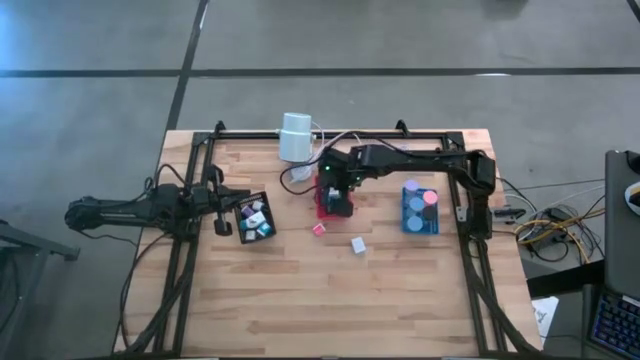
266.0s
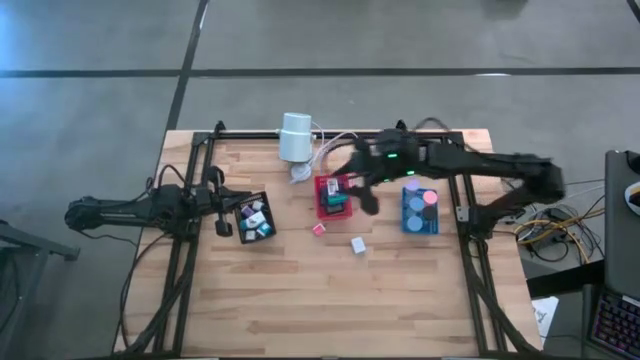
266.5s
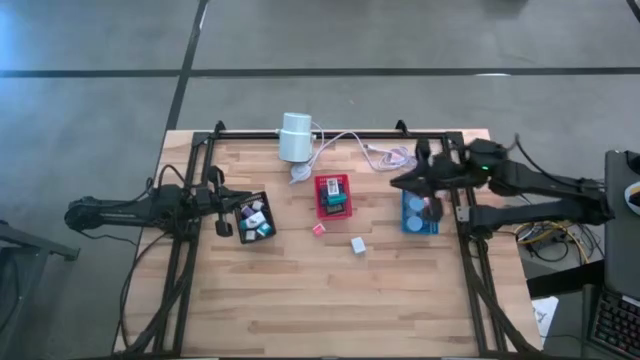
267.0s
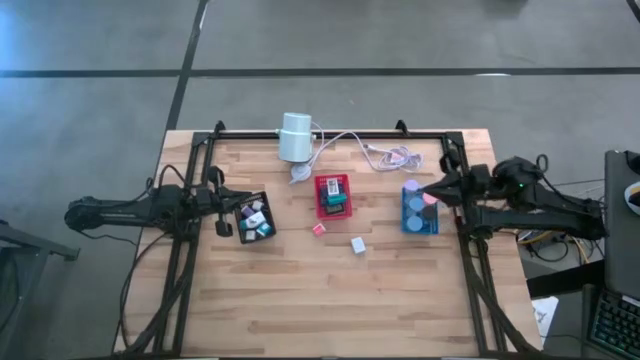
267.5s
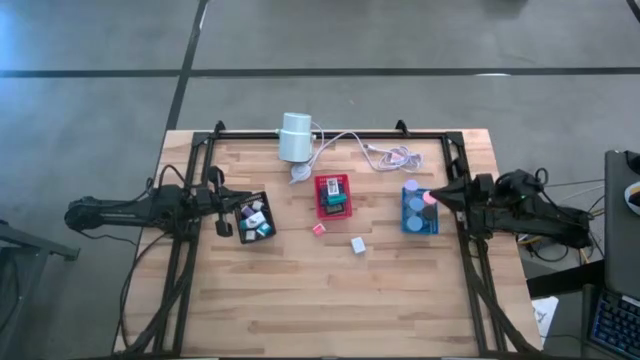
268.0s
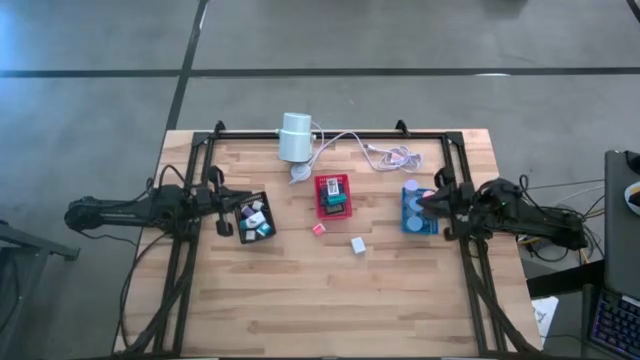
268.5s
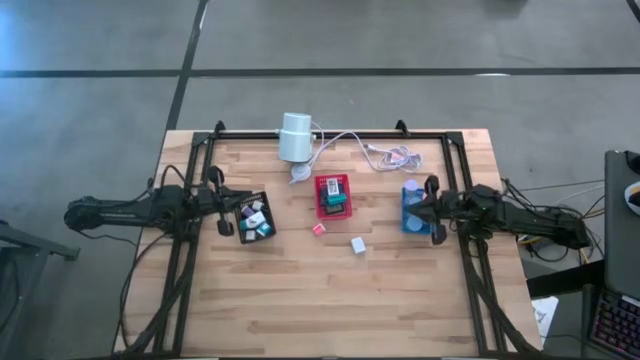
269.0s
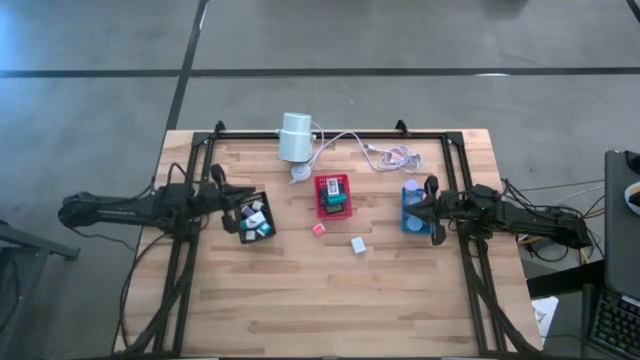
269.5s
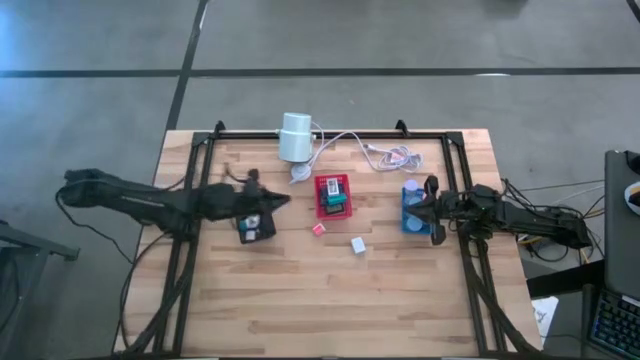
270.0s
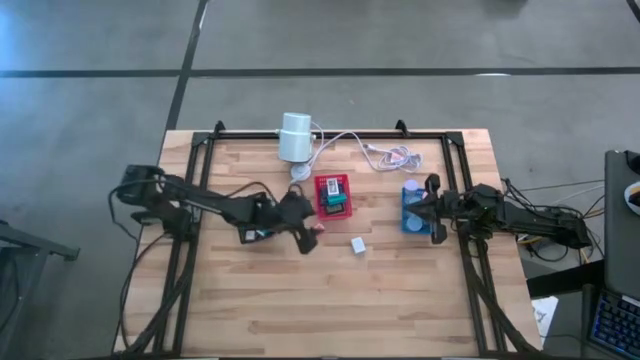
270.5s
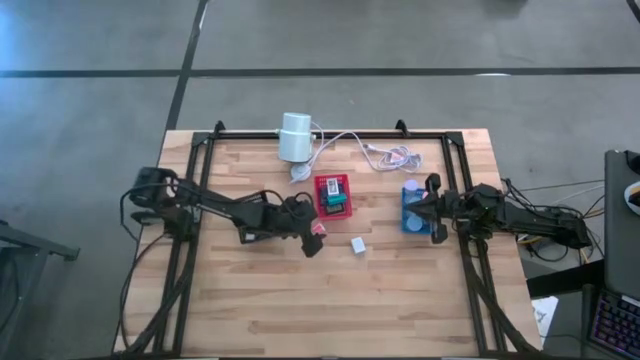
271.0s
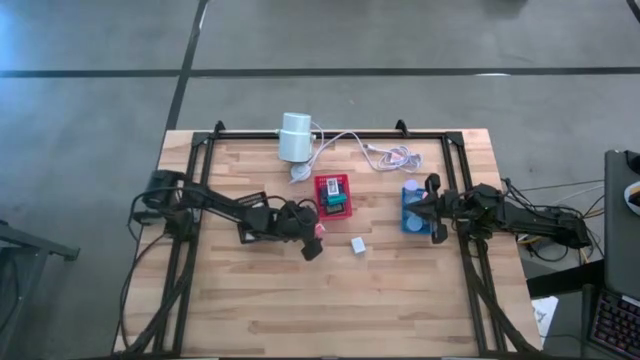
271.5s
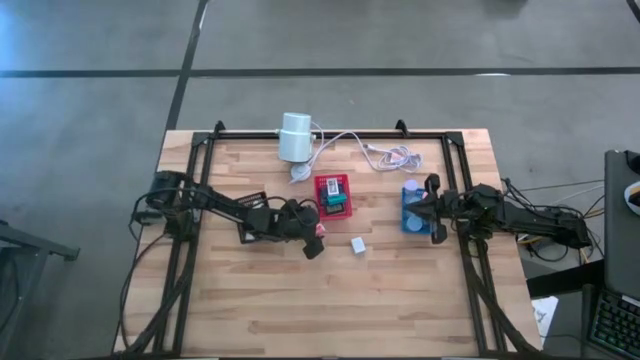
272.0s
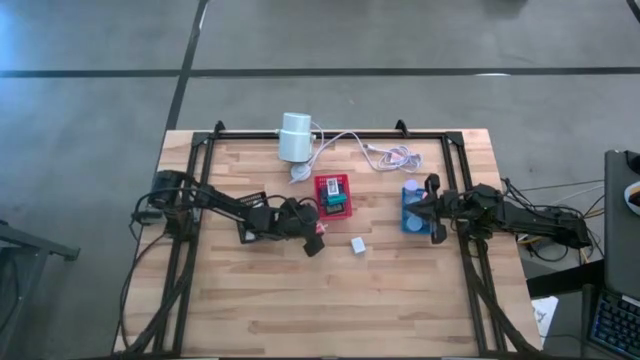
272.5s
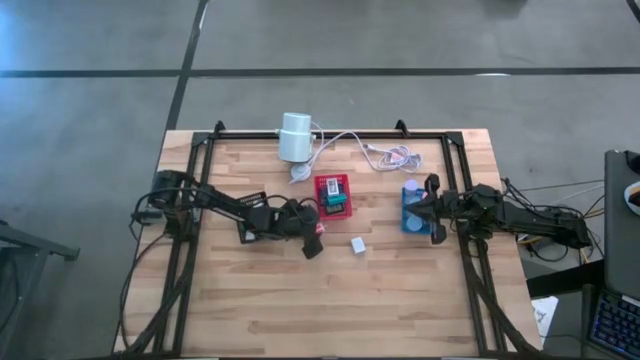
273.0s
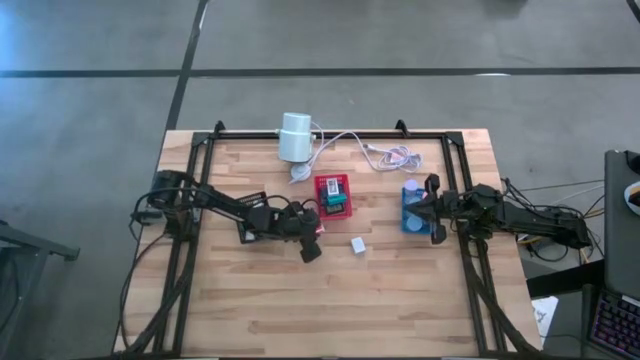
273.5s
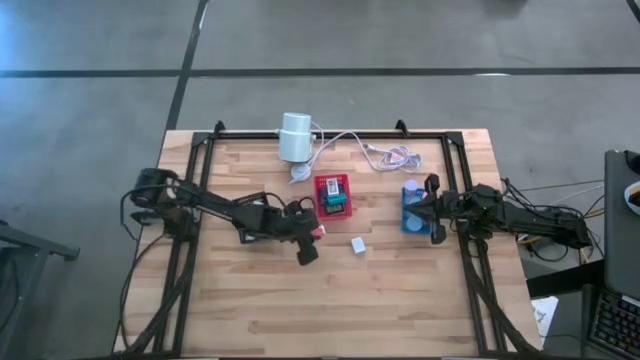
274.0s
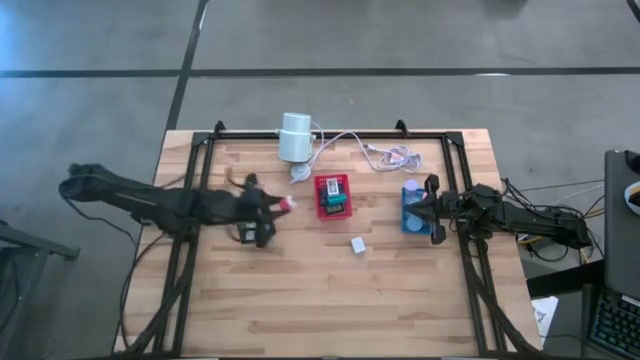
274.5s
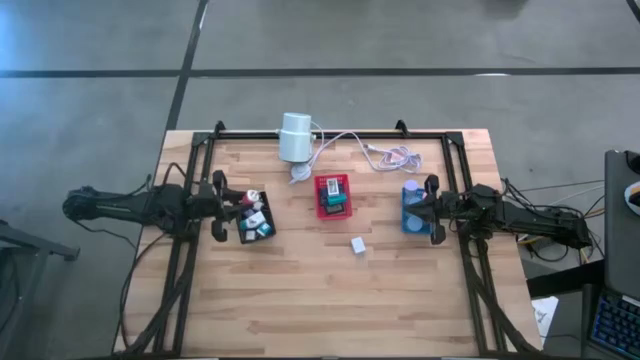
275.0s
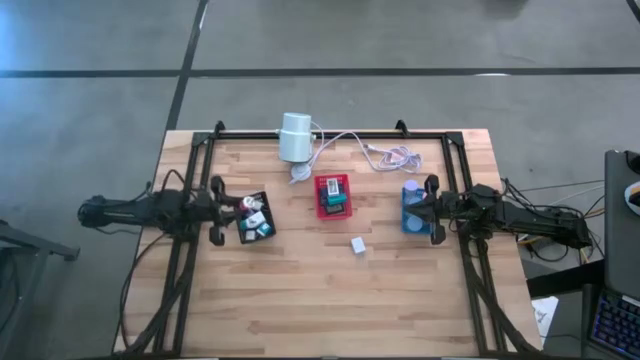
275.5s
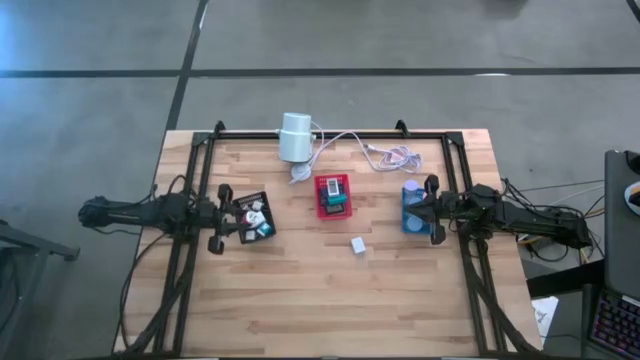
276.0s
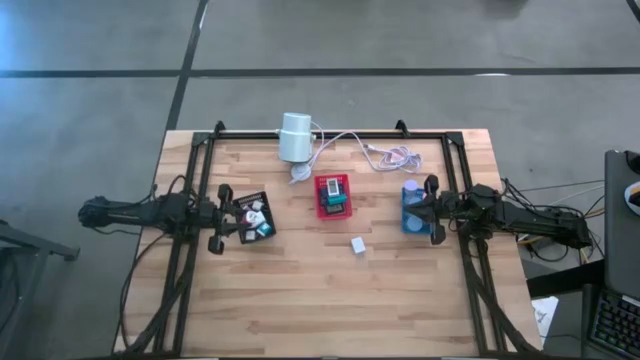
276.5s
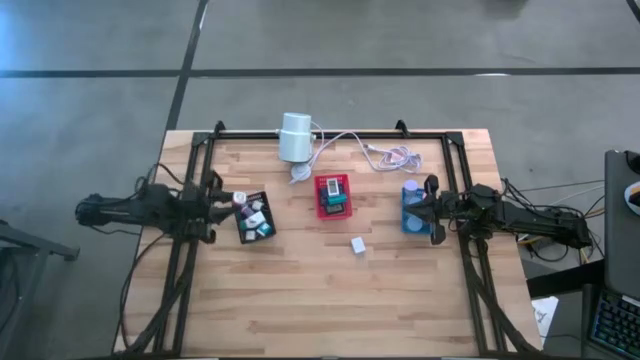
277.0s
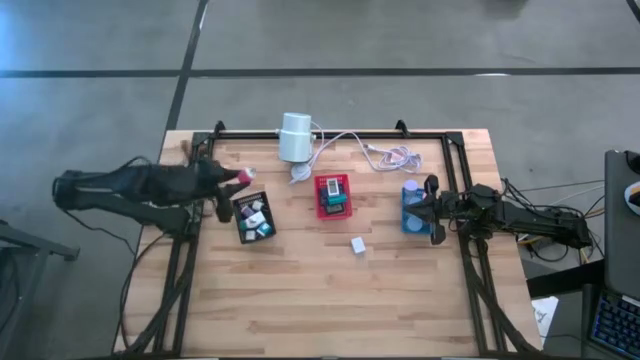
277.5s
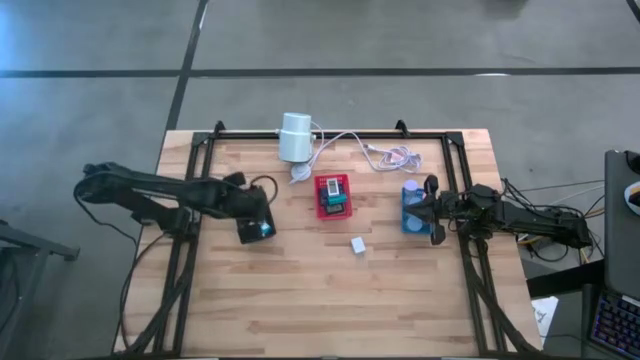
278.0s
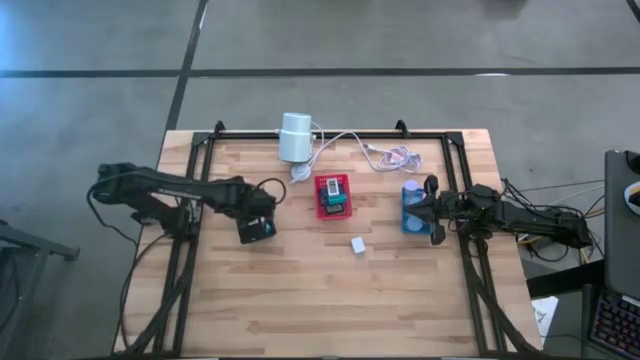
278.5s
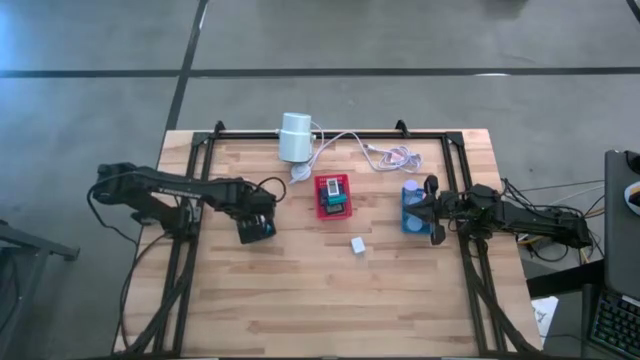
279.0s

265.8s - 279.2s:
Task: Pick & Place Office items
Put the pink charger adapter into the black basket

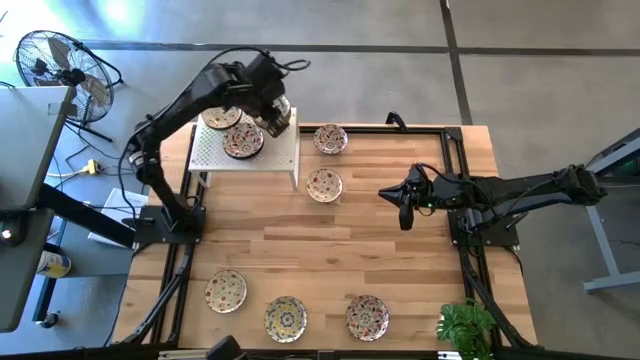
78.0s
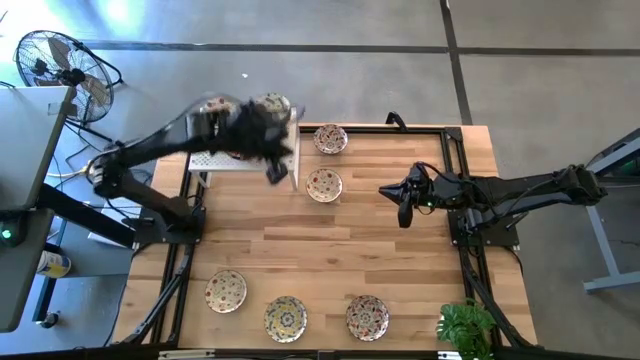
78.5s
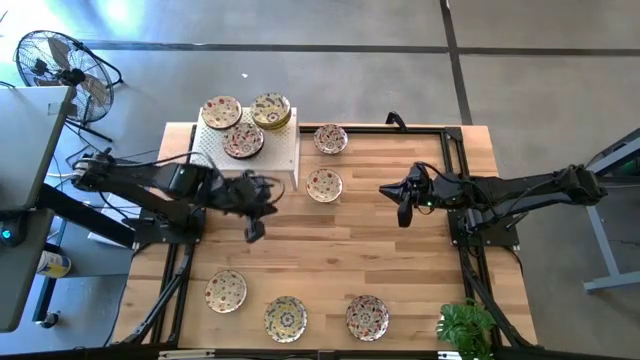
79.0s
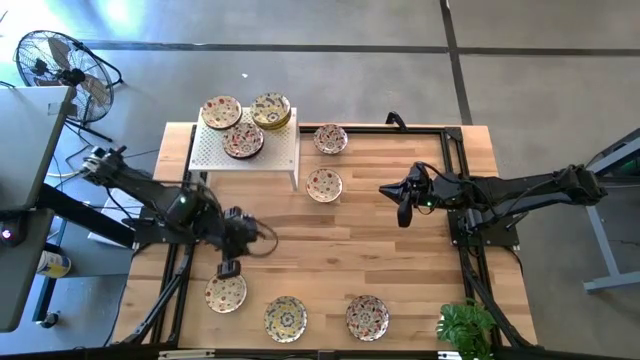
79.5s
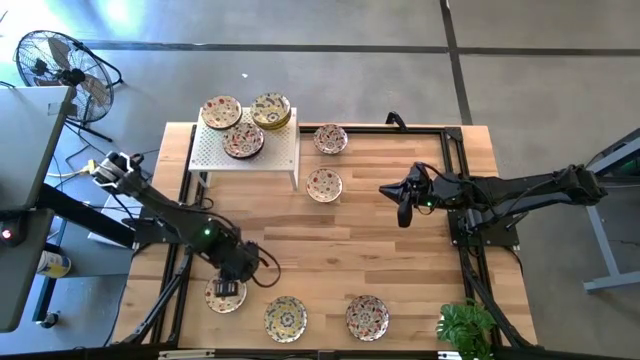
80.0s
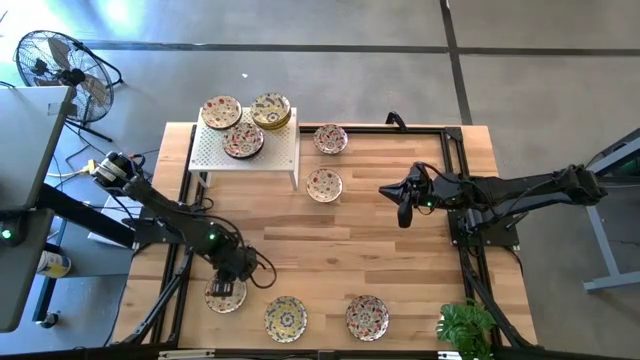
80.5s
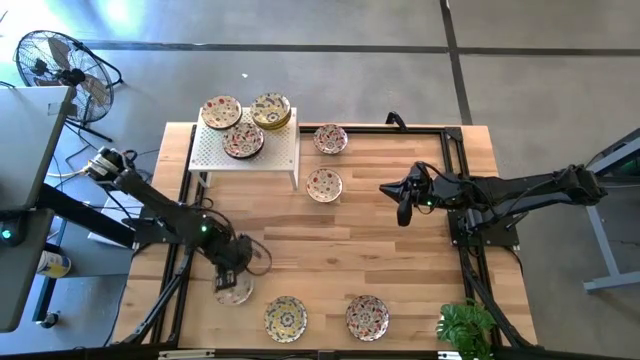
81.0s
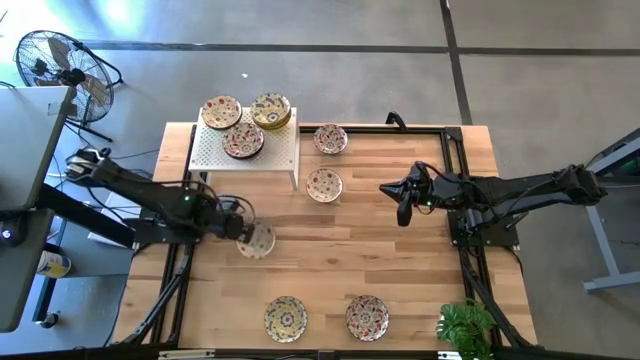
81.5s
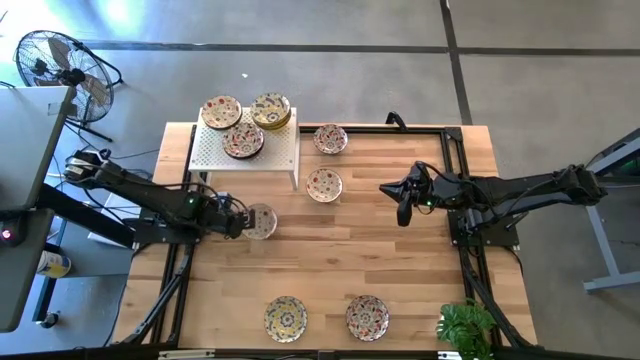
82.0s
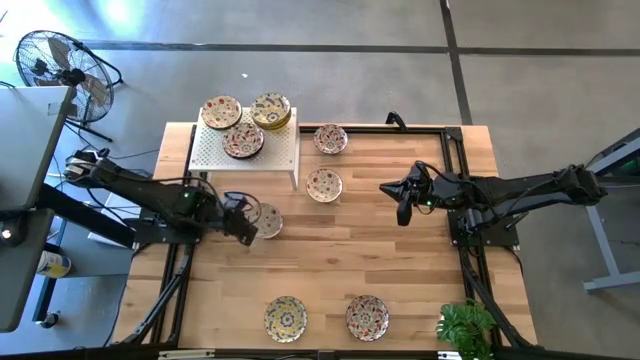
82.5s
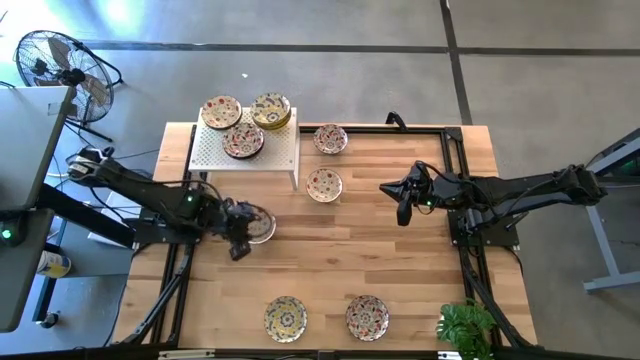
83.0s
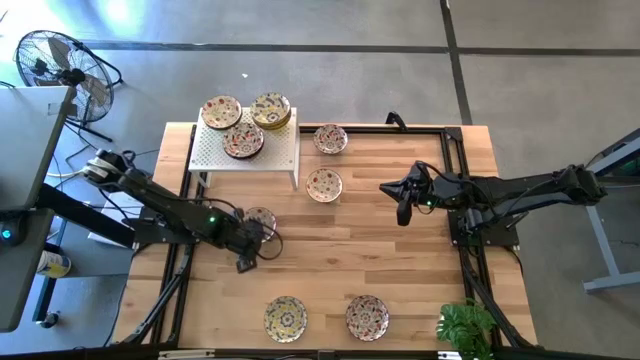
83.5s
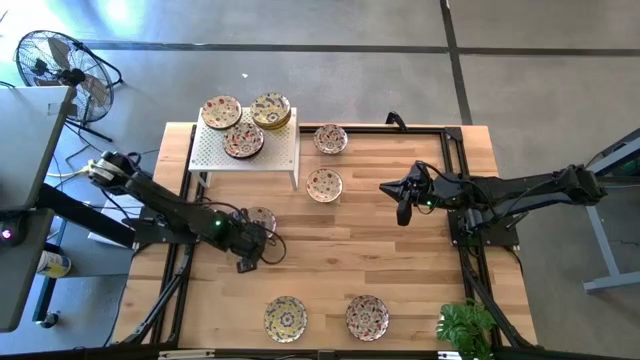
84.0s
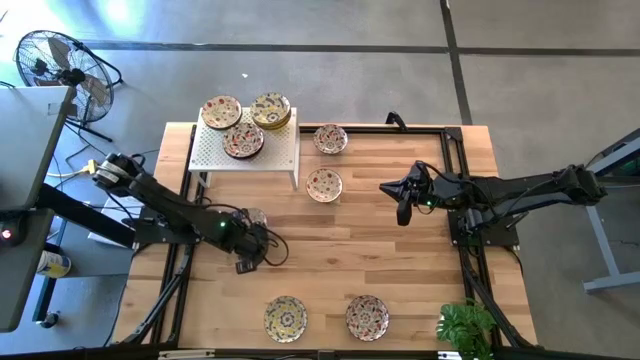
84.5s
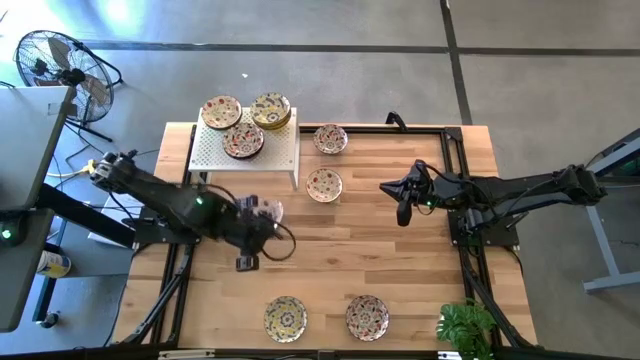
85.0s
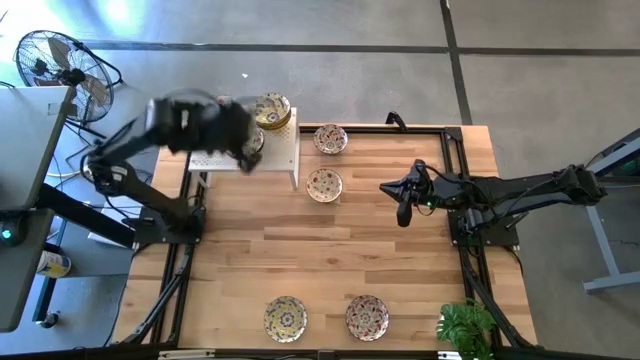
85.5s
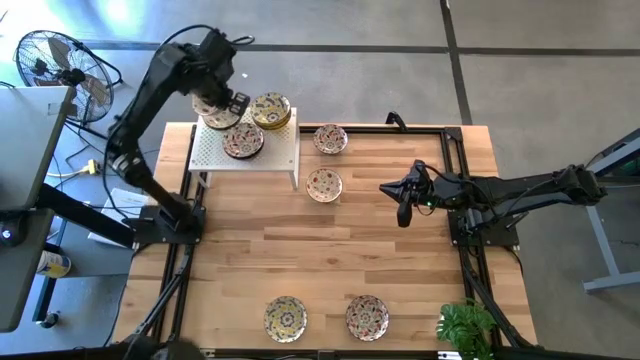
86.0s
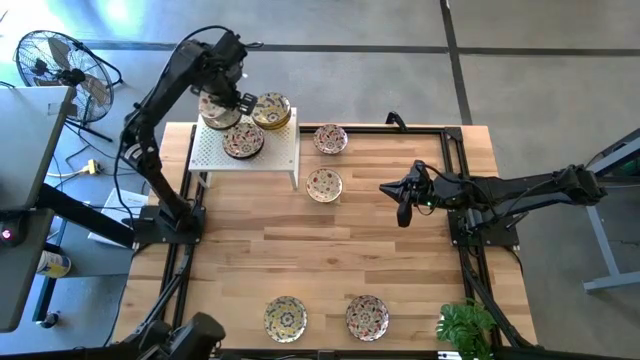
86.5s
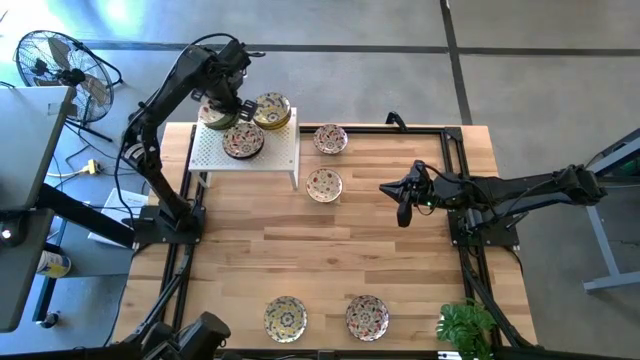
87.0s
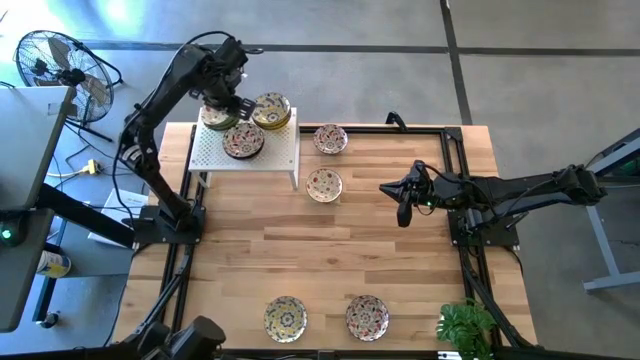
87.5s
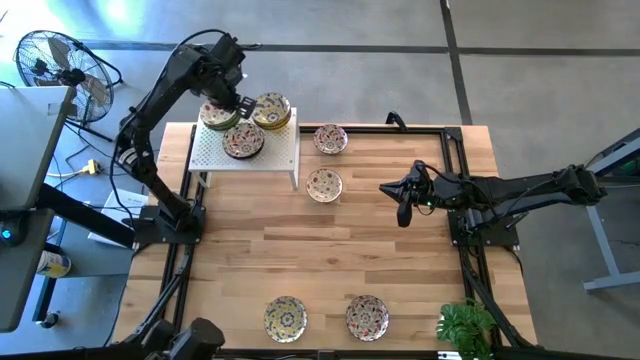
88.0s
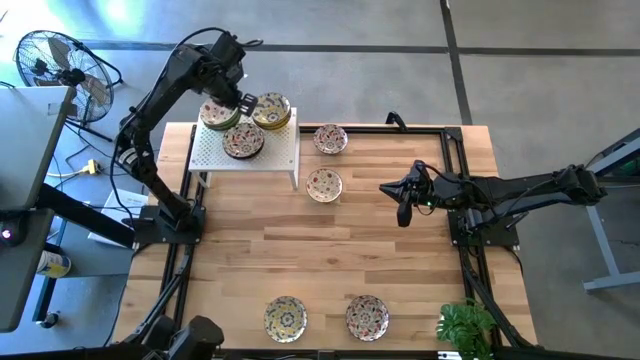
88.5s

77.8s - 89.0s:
Task: Pick & Place Mini bowls
Stack the red patterned bowl on the red patterned bowl on the shelf
